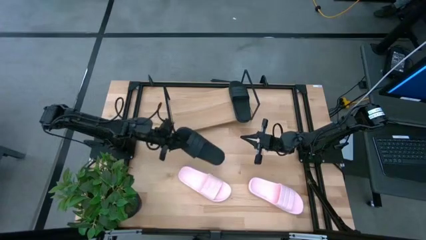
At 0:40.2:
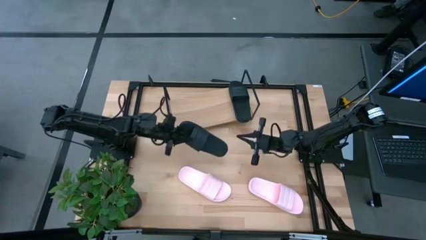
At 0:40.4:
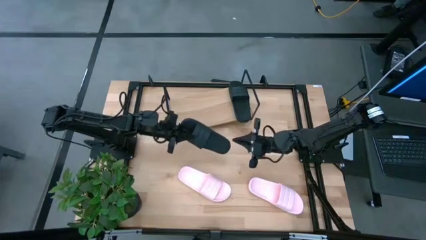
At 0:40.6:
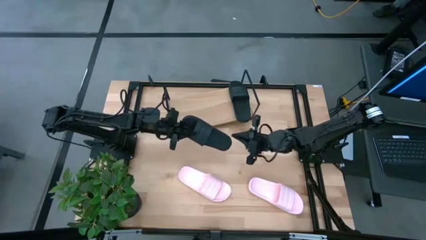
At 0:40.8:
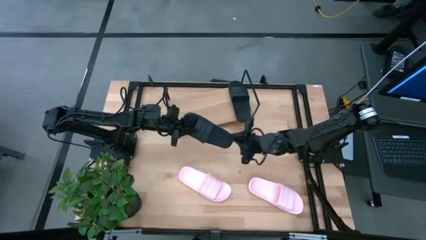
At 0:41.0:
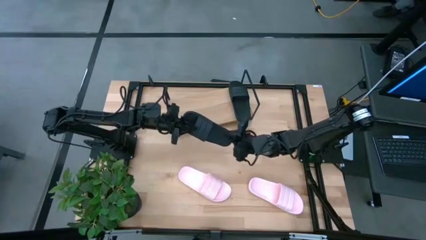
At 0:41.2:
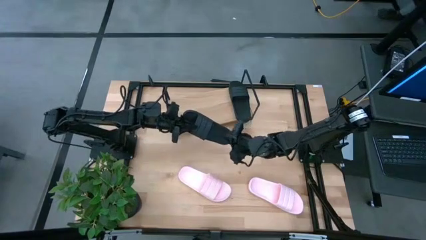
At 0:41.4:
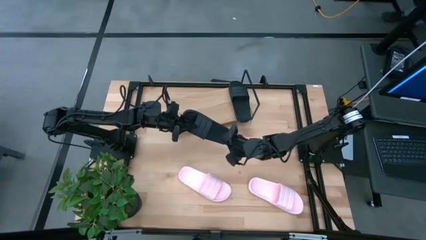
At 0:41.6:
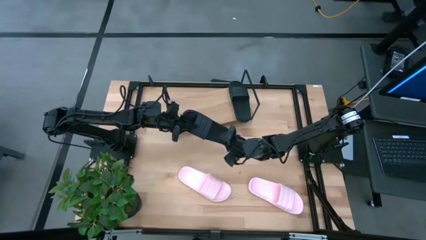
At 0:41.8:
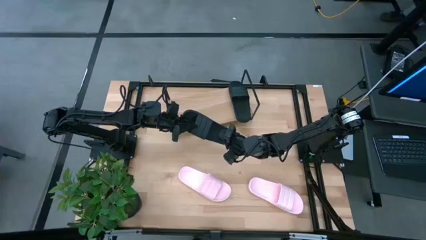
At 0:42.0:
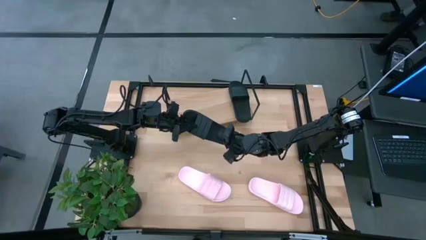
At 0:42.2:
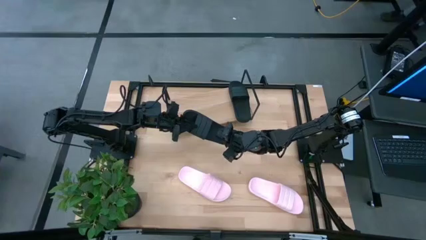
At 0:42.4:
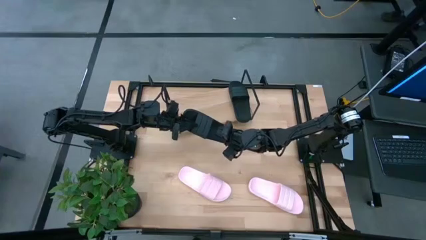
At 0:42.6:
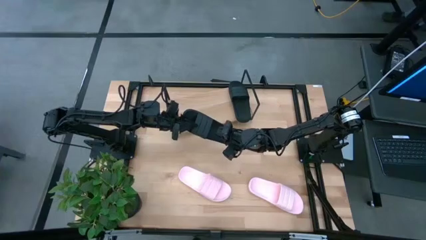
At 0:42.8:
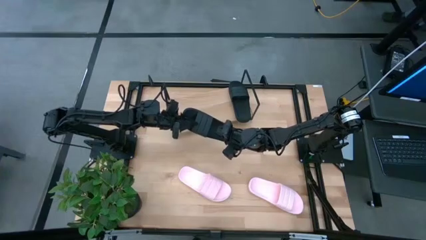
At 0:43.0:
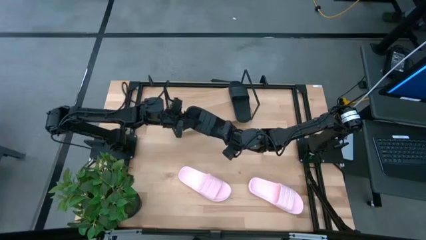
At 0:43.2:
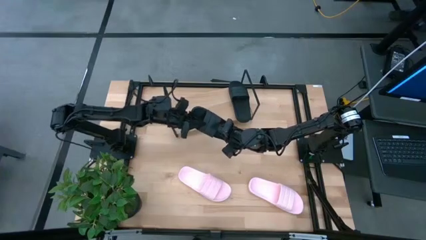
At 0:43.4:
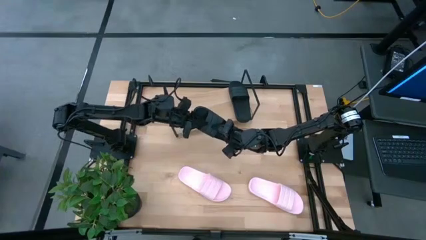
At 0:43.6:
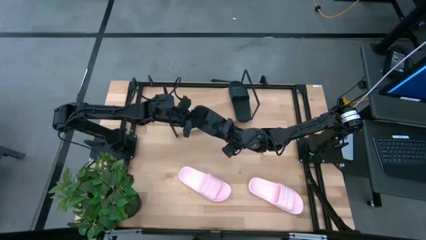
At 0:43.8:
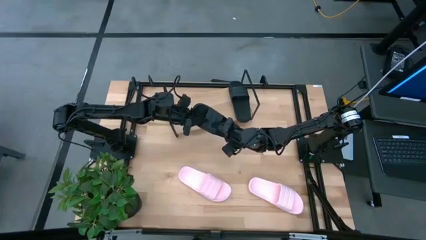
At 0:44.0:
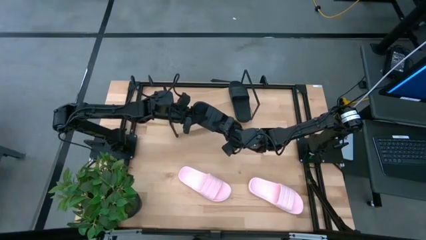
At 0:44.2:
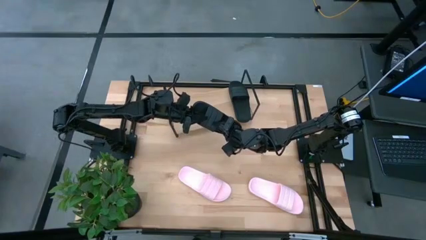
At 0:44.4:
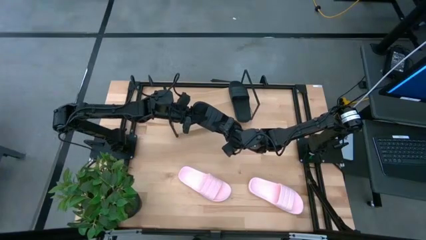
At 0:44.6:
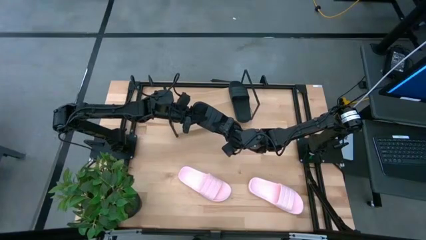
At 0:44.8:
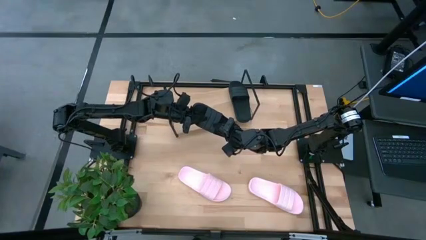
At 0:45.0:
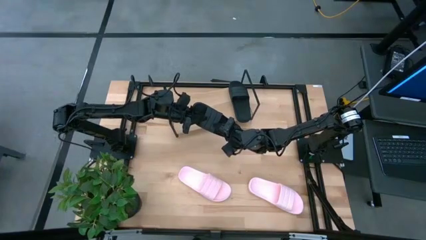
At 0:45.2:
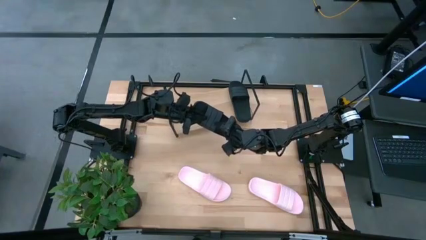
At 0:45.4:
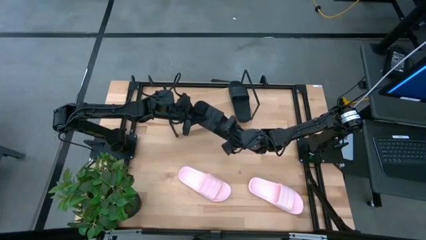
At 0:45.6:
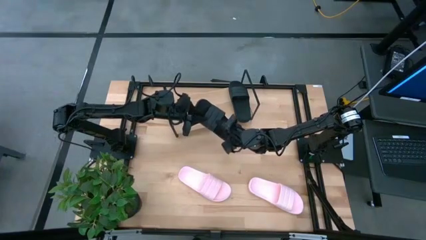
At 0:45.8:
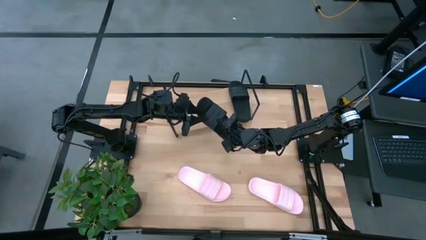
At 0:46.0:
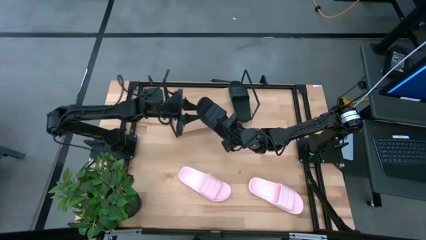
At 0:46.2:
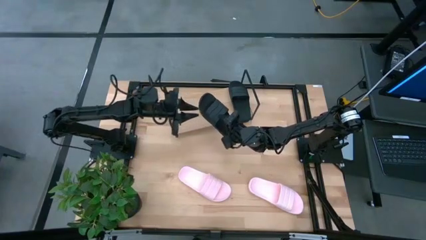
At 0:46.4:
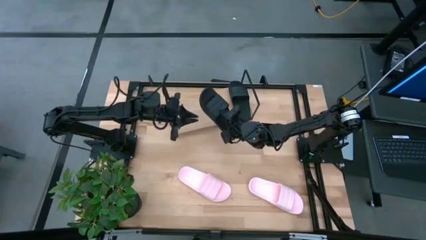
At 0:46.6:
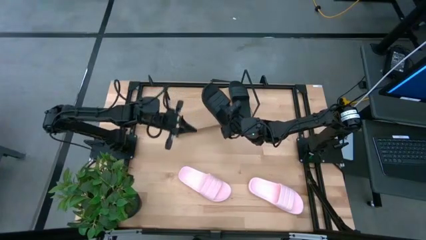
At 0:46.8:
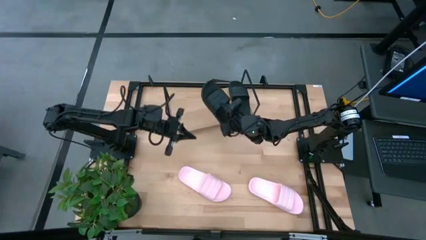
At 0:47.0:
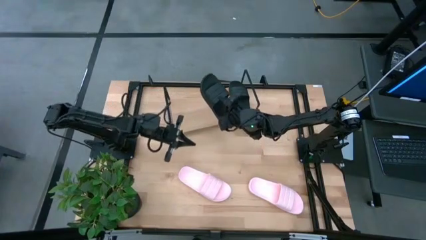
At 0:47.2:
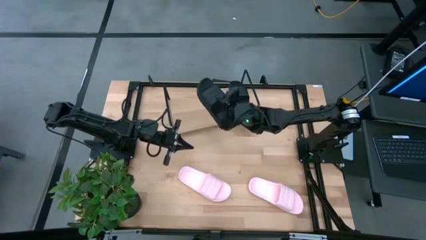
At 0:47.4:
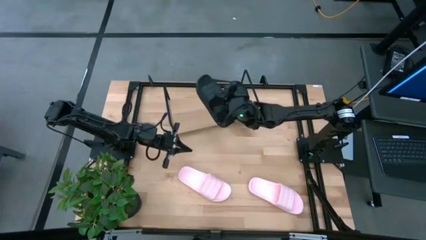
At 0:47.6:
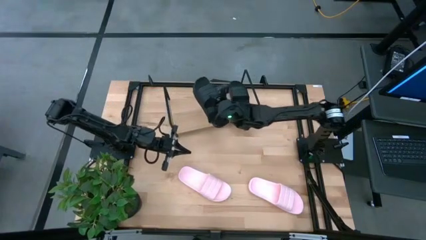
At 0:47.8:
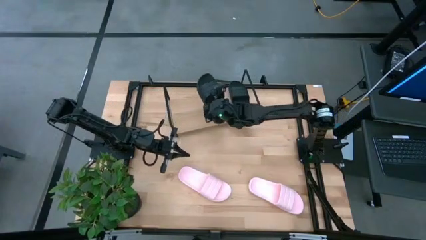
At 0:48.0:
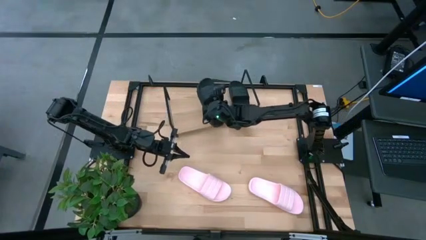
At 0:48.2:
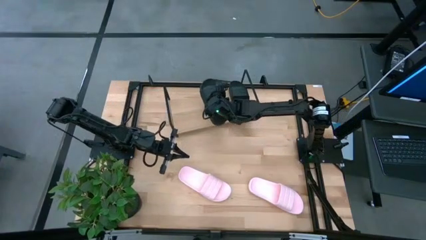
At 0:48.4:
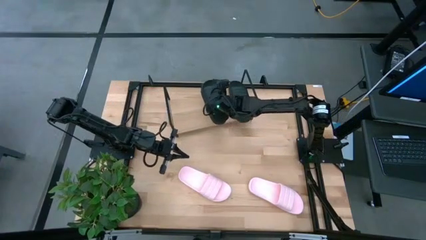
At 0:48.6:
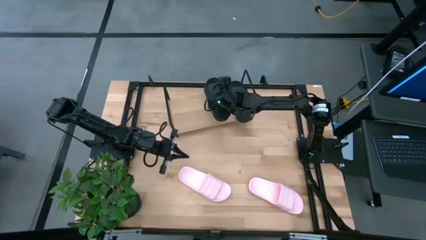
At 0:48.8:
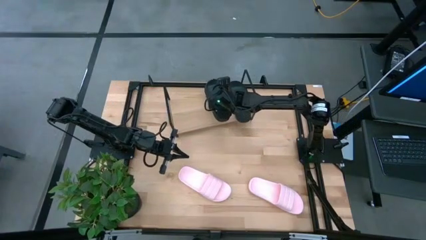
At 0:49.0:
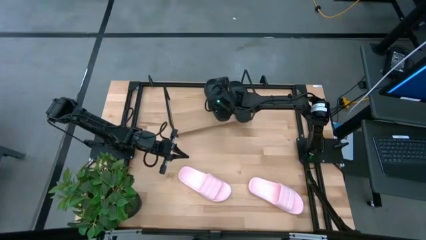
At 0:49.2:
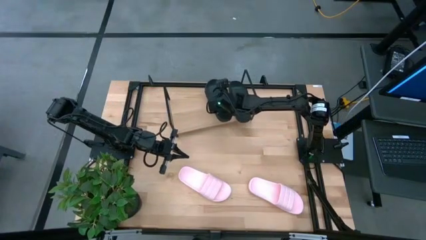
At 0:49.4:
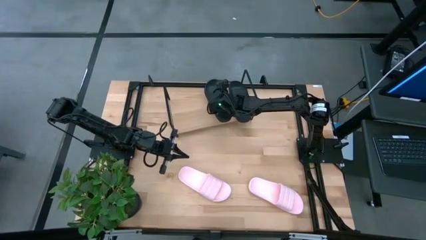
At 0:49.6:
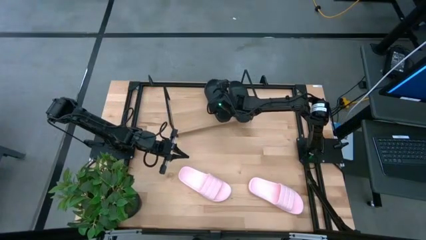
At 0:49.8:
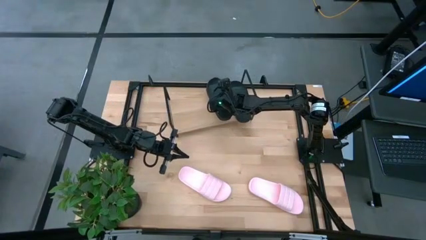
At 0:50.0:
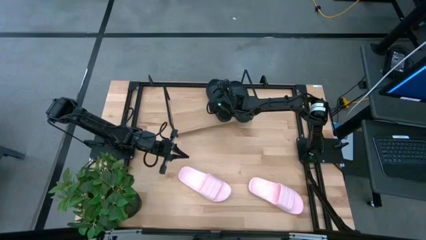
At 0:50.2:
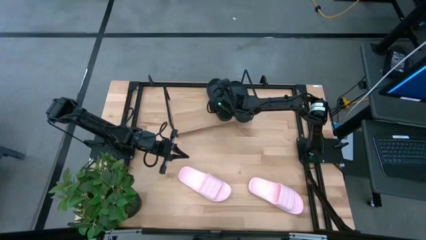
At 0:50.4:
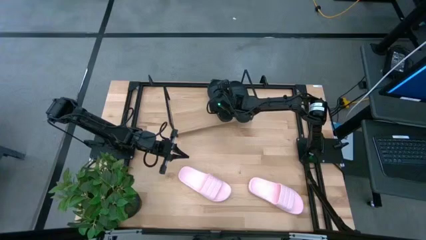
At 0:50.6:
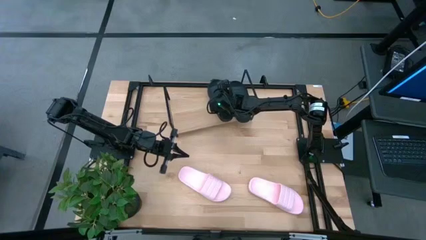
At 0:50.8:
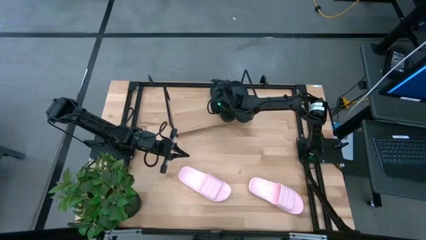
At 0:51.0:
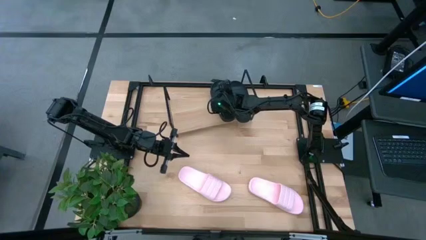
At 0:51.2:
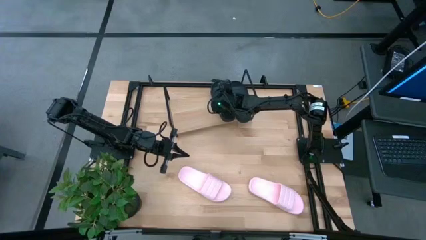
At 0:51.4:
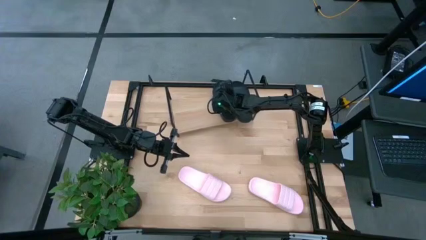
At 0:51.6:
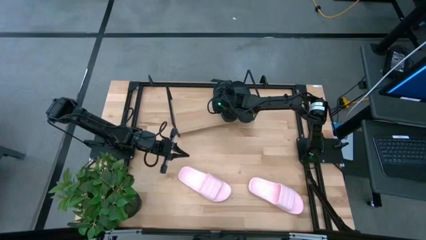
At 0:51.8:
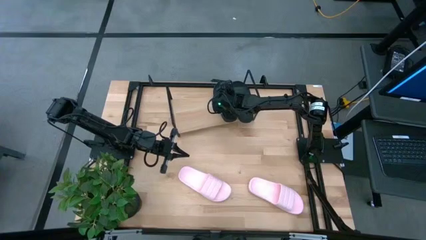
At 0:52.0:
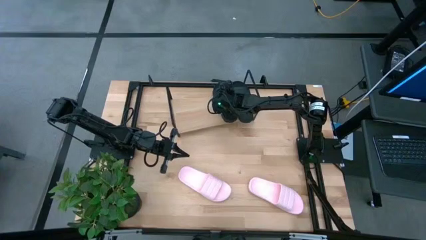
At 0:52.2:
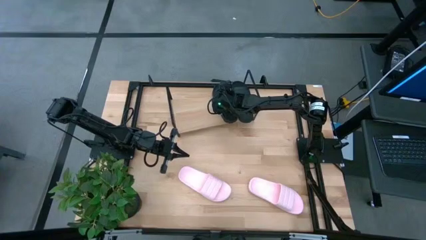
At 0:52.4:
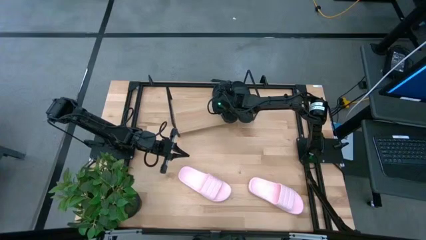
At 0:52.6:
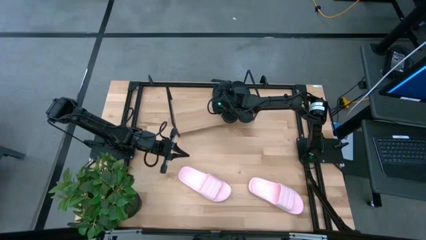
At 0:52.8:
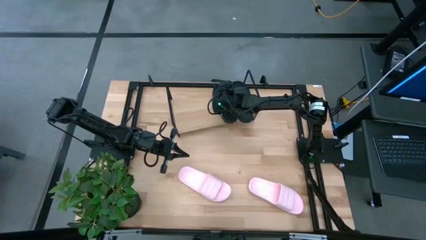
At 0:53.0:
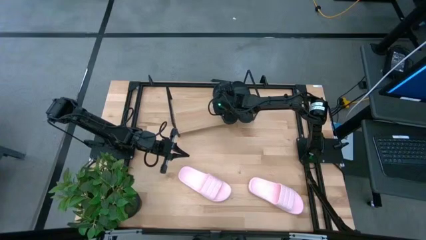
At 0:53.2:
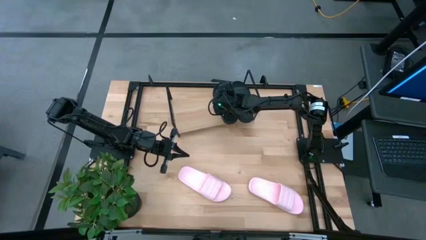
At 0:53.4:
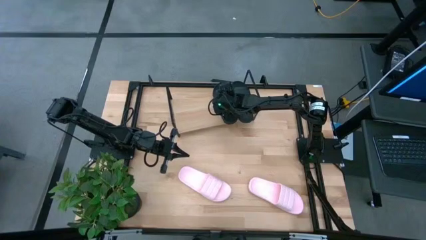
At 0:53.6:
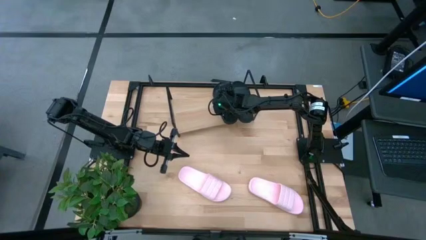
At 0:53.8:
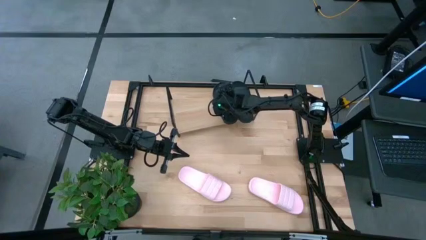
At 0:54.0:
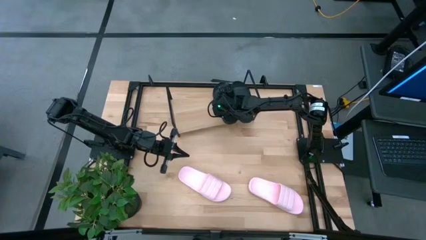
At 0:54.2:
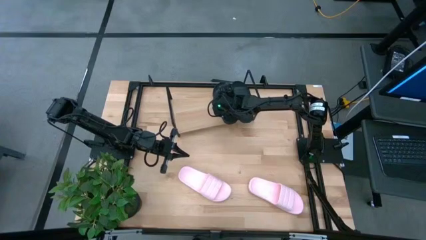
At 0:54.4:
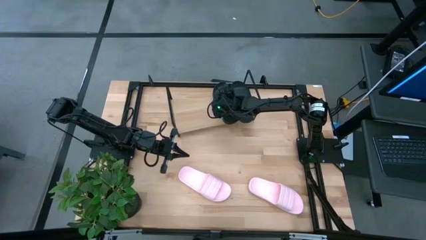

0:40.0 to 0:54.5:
Task: Pick and place slides into the shelf
Put the black slipper on the shelf
